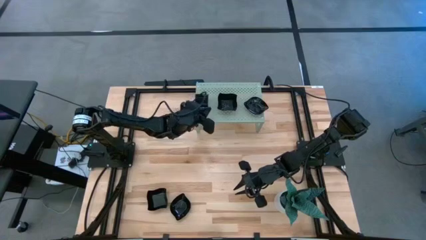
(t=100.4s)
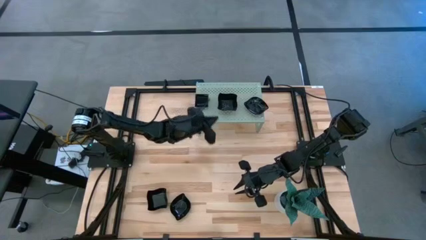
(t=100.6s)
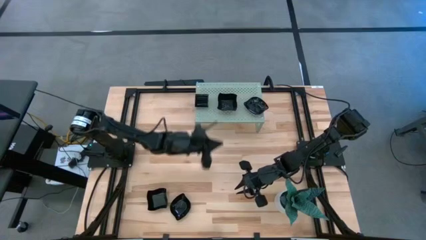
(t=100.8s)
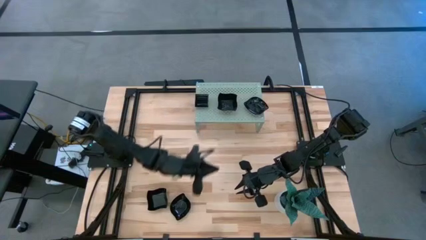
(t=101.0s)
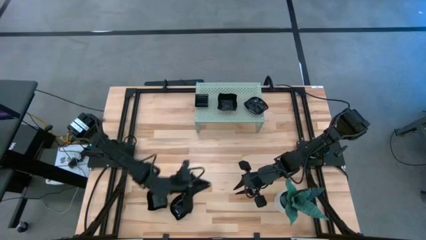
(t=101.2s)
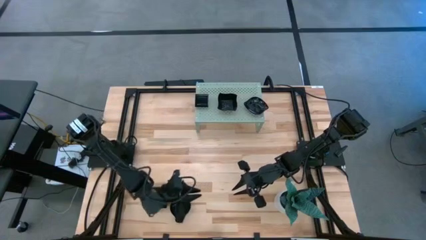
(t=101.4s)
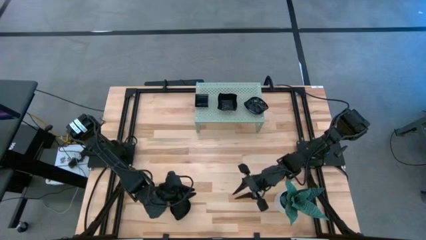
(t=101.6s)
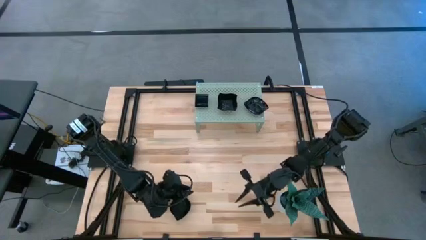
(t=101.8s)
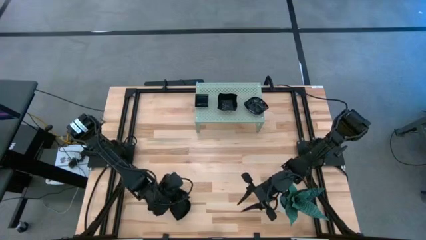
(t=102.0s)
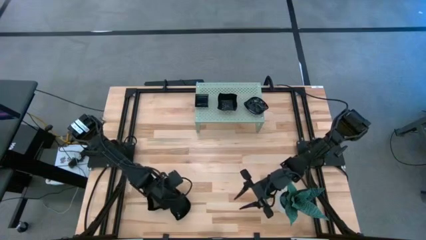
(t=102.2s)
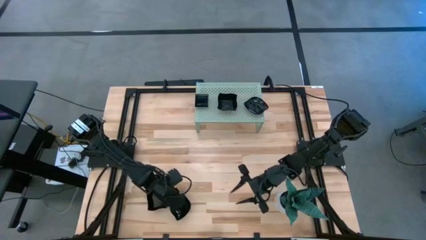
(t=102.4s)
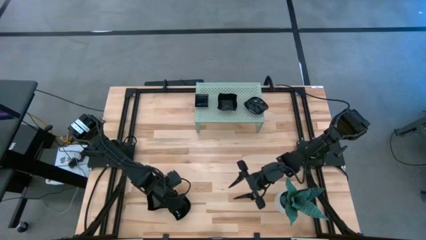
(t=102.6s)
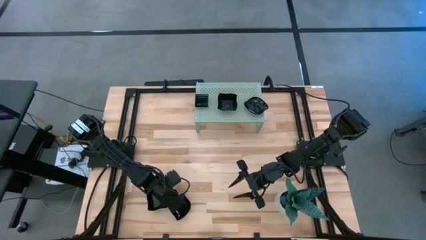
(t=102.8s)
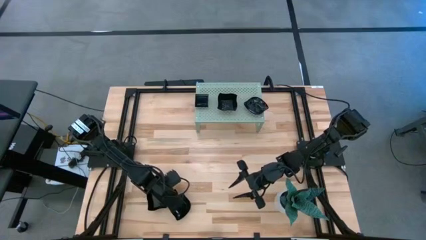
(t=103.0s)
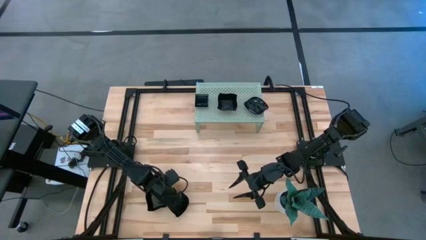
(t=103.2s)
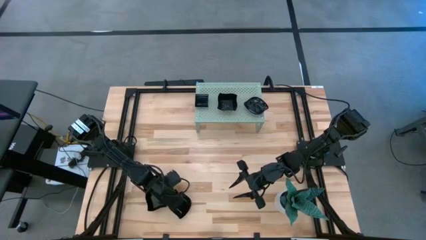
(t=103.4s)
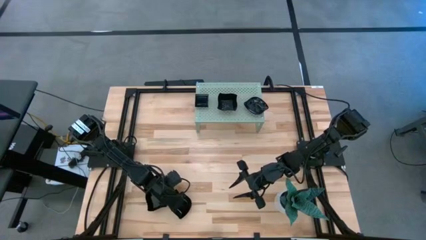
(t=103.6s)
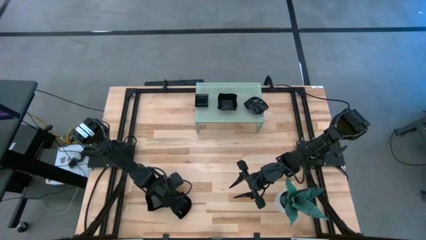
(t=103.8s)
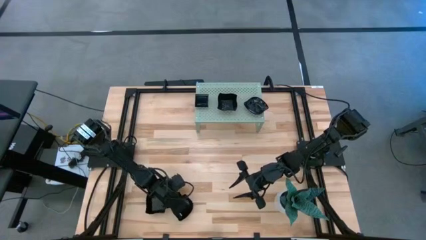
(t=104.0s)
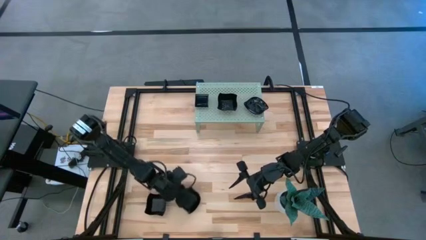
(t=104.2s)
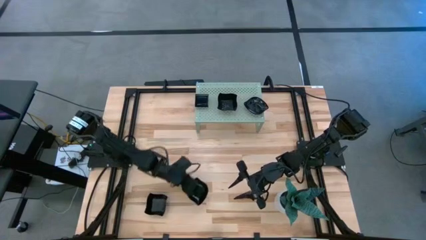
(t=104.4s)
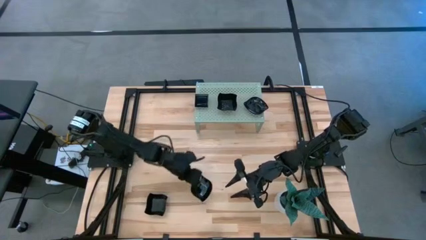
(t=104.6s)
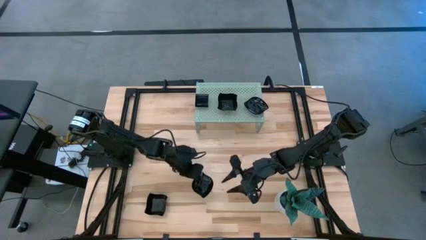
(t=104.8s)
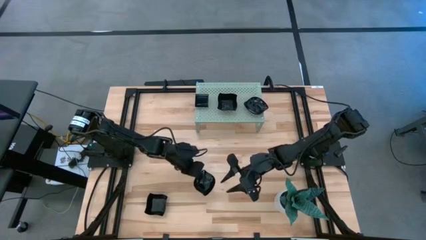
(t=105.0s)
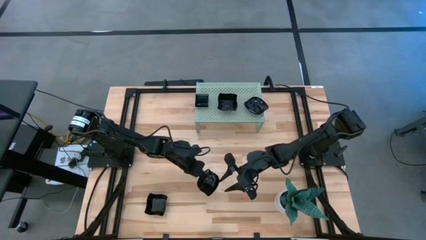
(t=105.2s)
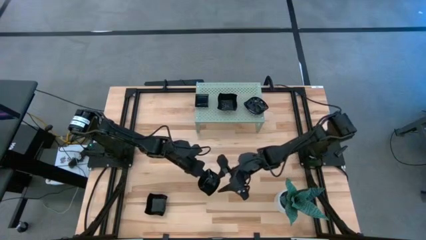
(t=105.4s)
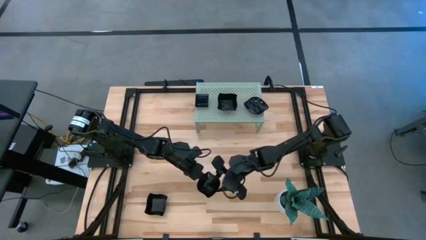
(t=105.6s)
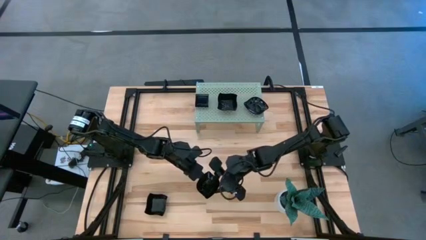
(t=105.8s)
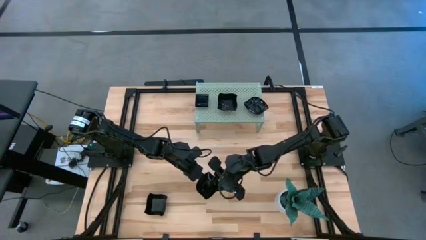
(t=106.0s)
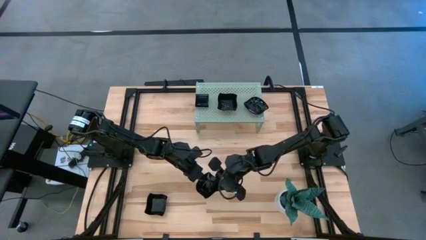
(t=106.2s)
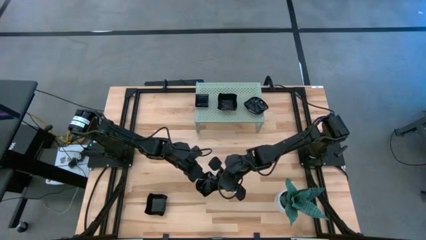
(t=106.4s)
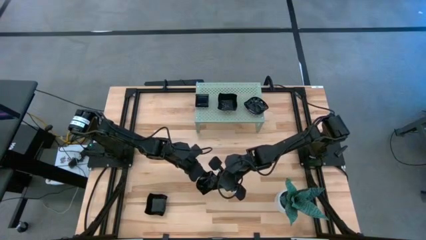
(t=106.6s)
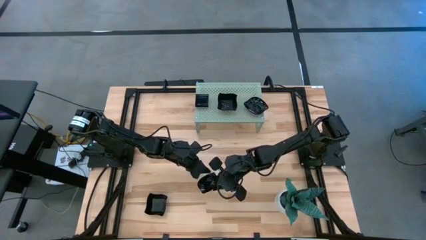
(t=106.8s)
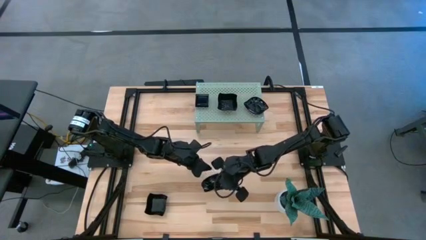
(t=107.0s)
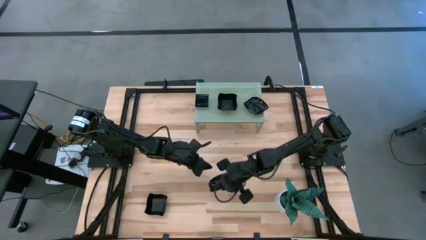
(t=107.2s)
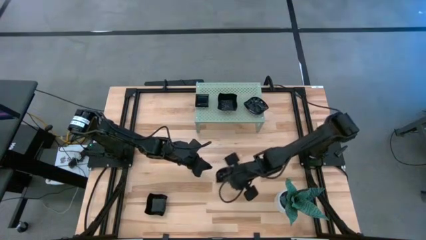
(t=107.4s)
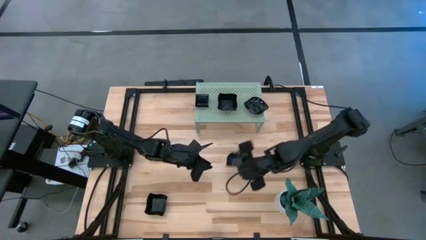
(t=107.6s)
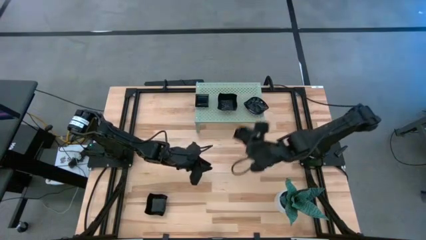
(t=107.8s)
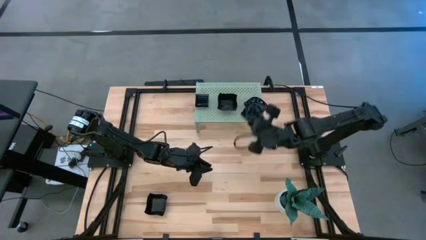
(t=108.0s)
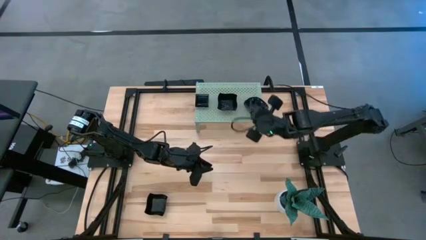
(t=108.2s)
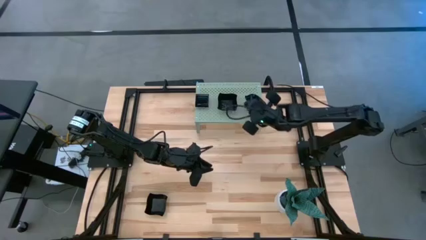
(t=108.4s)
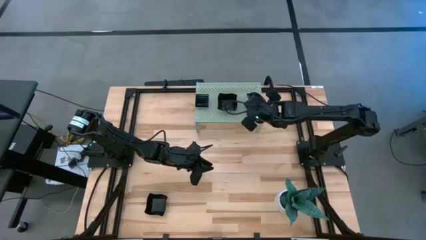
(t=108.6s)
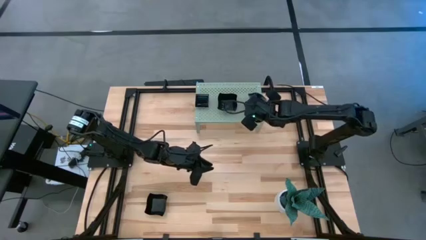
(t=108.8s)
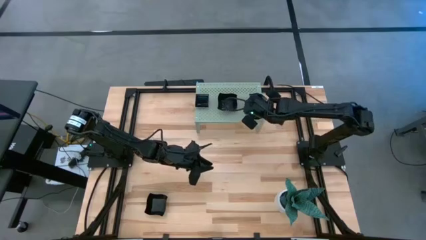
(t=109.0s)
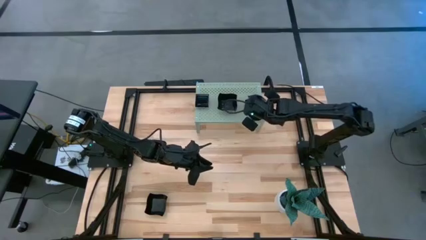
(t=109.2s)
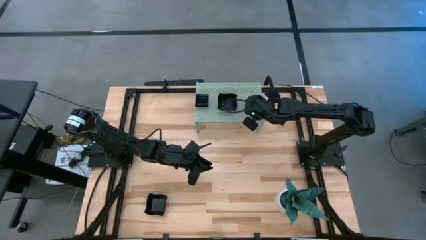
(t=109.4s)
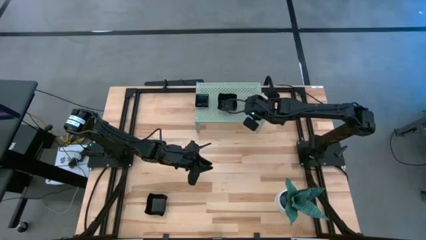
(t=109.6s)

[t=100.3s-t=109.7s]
Task: Pick & Place Mini shaped plates
Stack the leaf shaped plate on top of the other leaf shaped plate on the shelf

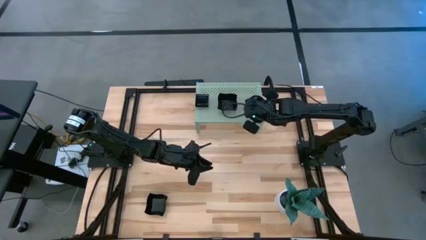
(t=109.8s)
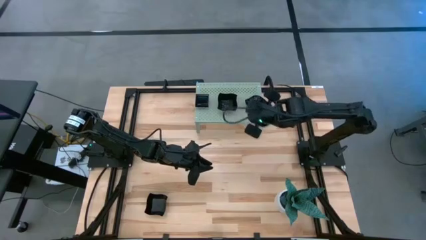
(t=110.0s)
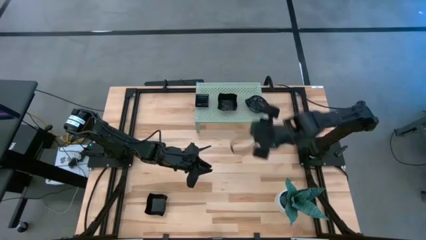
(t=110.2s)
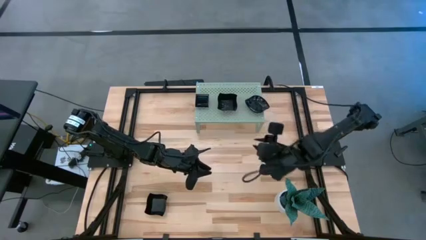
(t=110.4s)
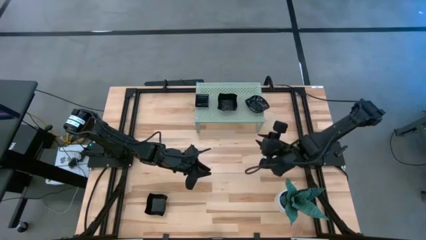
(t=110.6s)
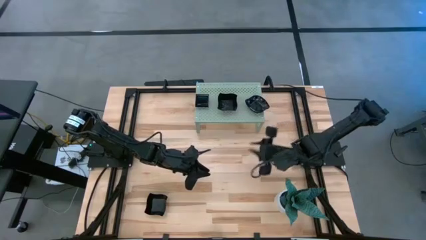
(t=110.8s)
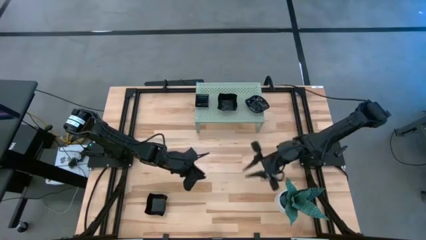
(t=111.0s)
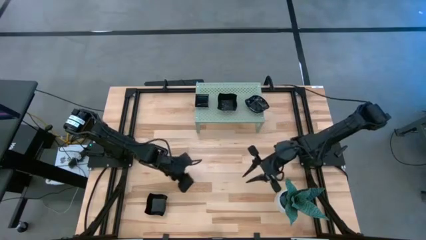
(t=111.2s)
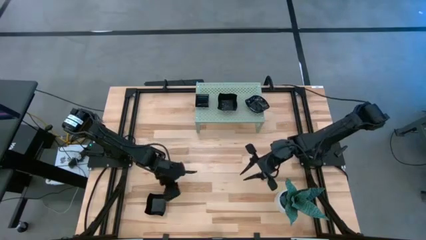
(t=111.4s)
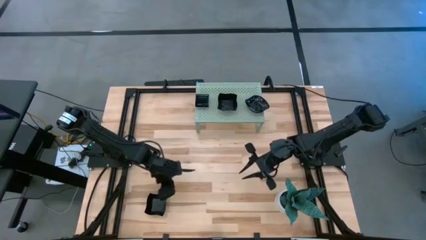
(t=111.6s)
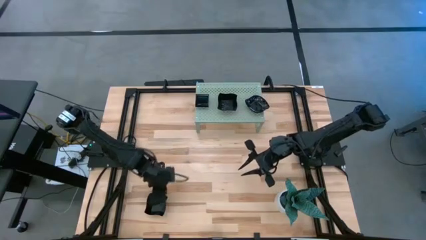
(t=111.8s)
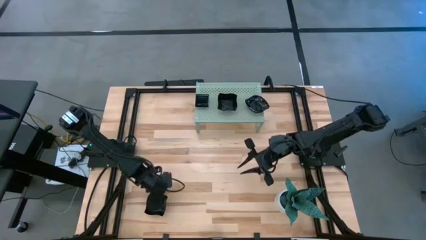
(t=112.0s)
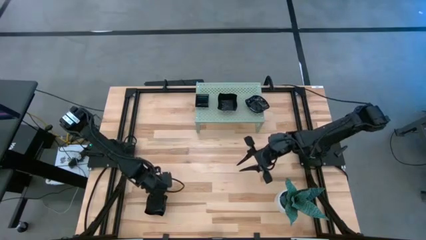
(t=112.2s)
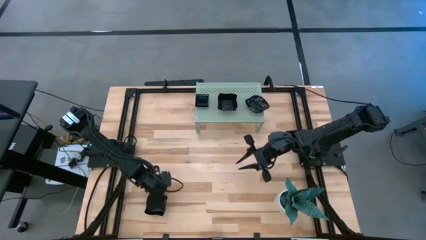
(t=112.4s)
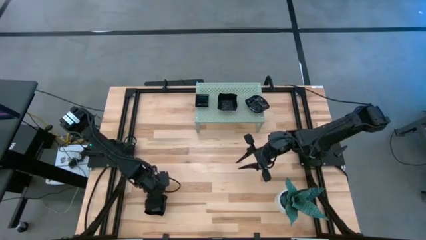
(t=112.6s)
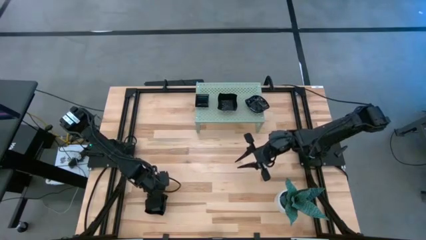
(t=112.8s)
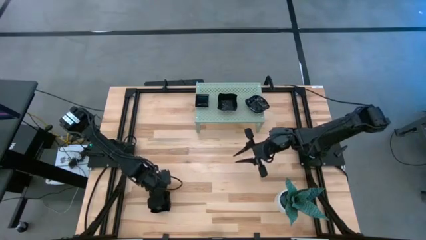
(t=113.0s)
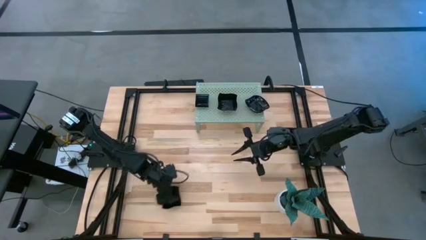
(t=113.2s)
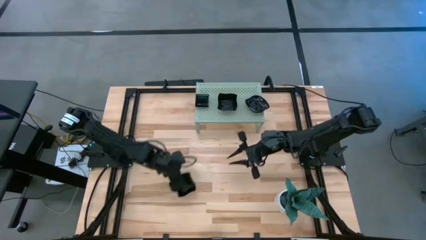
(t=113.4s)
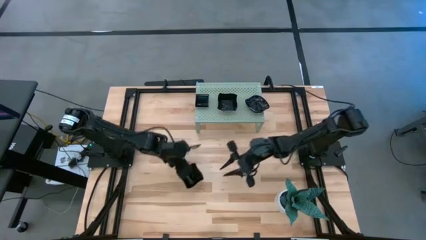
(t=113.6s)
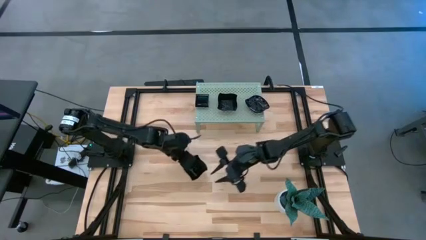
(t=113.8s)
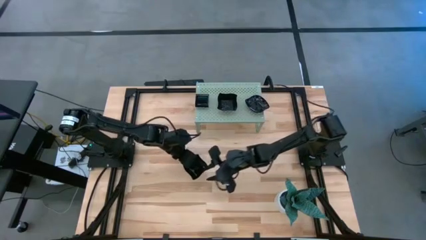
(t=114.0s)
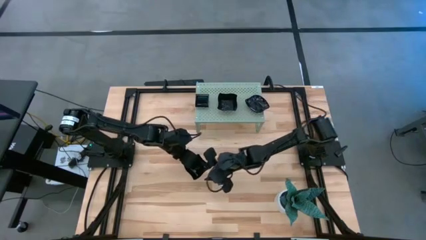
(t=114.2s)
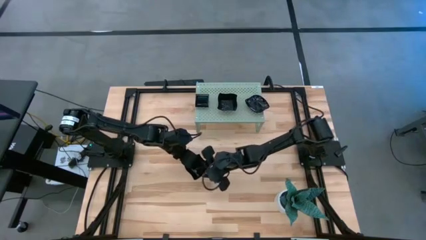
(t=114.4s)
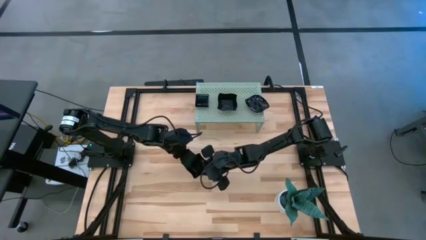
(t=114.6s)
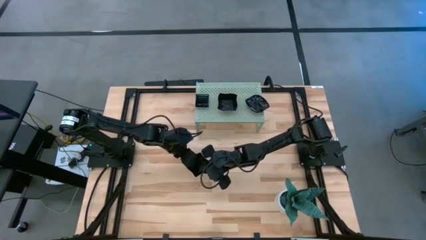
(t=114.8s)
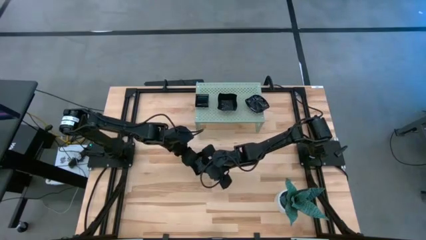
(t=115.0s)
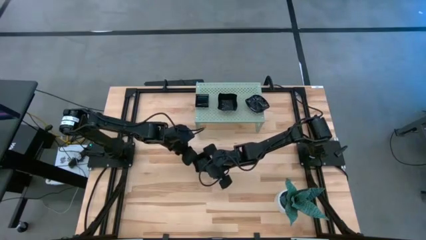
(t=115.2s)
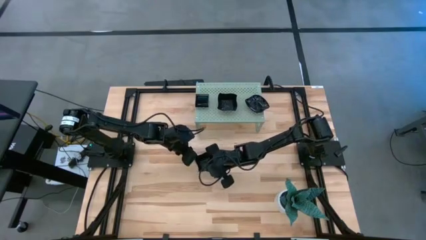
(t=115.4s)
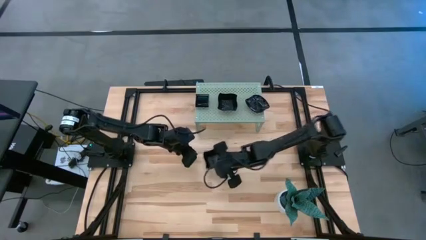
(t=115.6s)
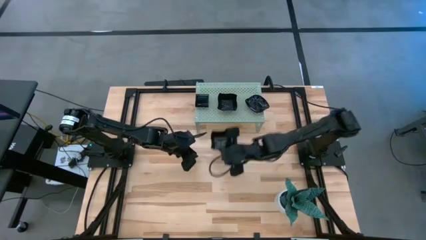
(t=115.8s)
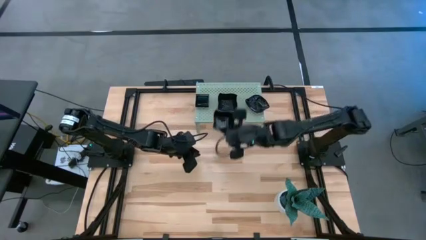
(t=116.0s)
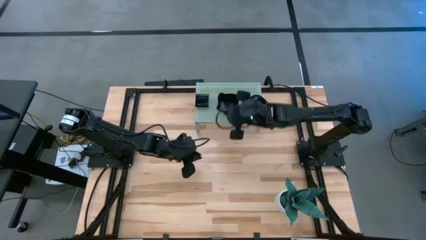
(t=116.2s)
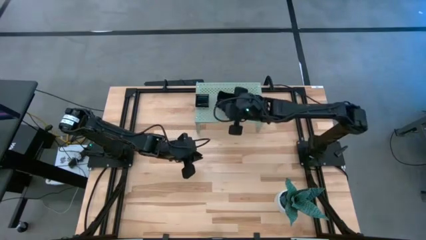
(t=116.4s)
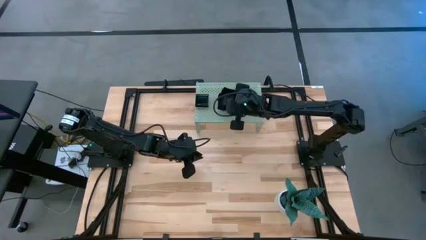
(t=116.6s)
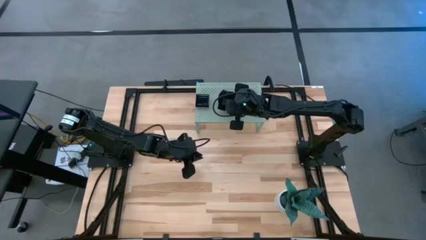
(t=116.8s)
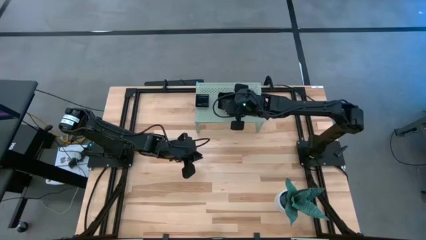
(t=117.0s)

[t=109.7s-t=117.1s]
Stack the distorted plate on top of the other distorted plate on the shelf
